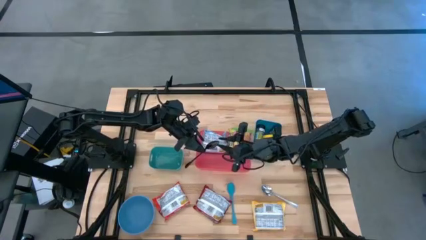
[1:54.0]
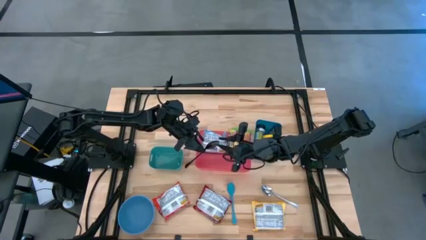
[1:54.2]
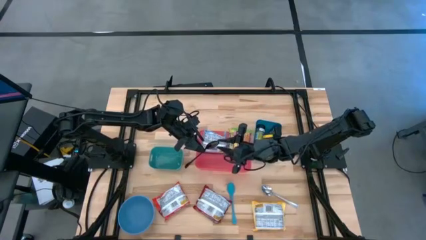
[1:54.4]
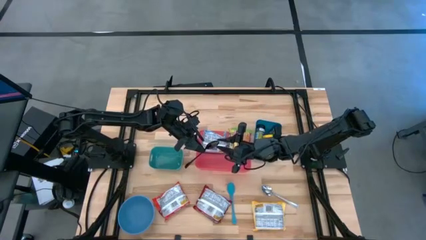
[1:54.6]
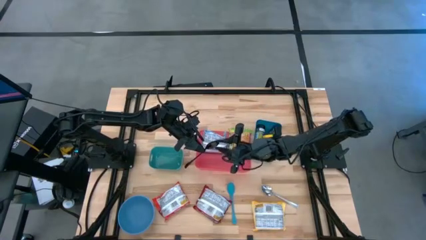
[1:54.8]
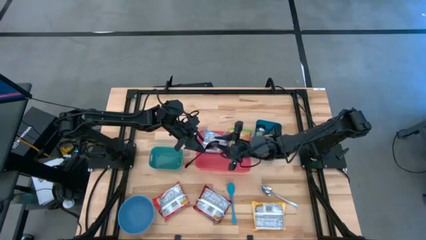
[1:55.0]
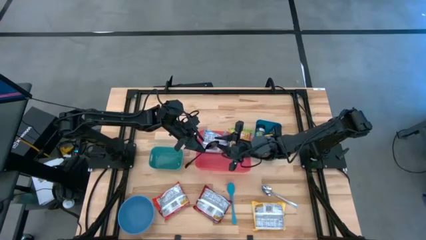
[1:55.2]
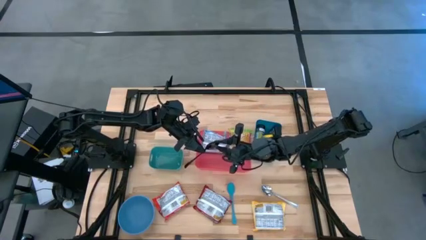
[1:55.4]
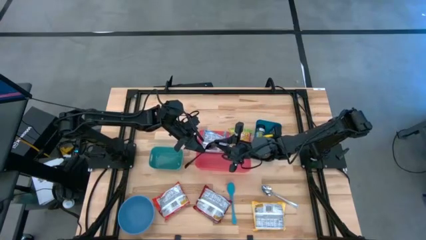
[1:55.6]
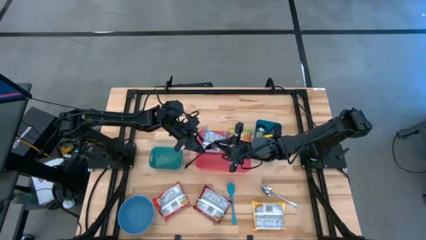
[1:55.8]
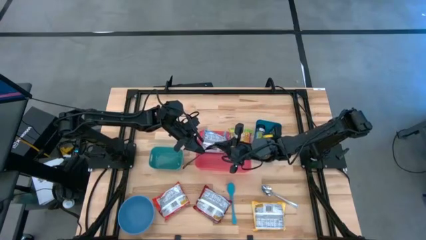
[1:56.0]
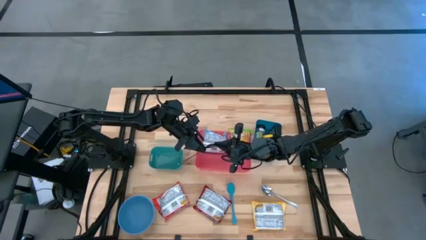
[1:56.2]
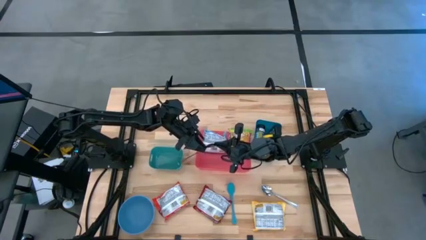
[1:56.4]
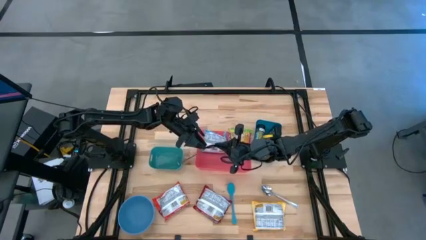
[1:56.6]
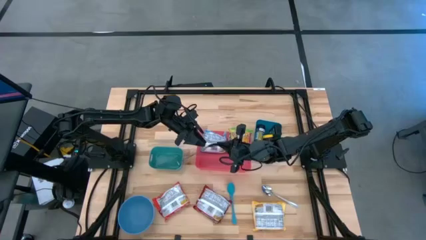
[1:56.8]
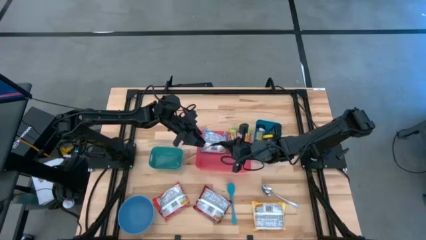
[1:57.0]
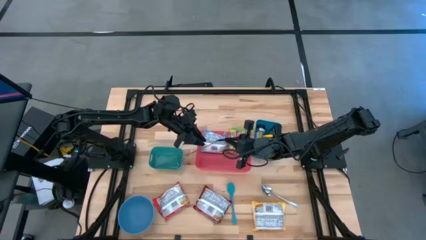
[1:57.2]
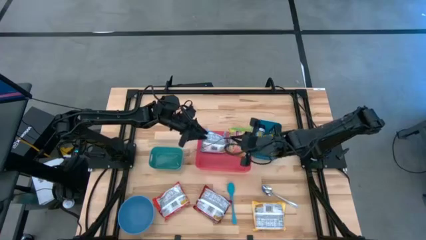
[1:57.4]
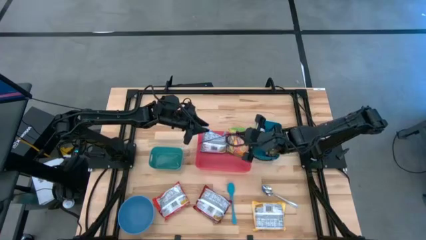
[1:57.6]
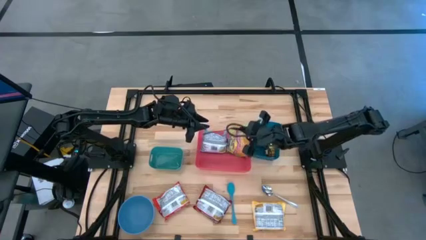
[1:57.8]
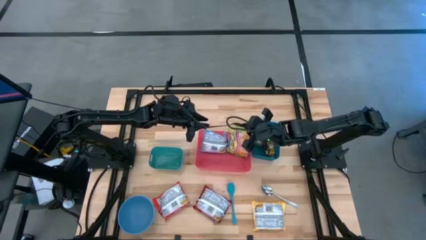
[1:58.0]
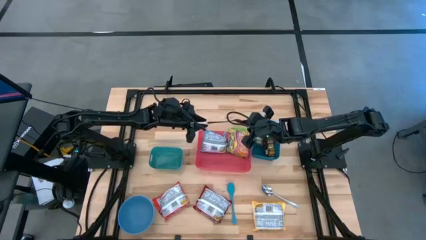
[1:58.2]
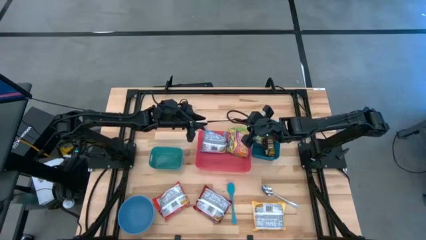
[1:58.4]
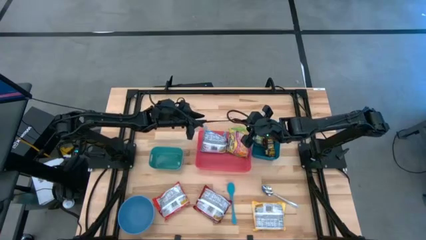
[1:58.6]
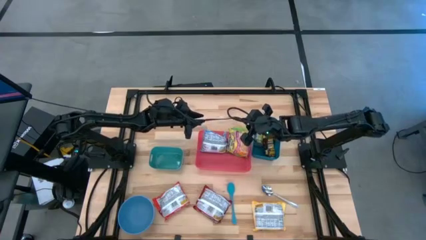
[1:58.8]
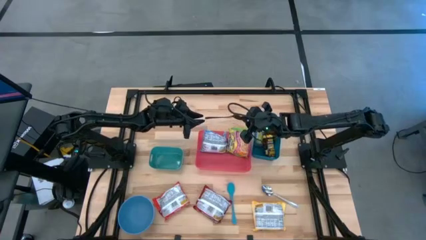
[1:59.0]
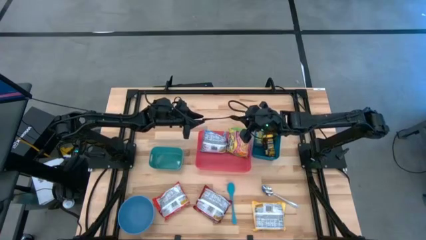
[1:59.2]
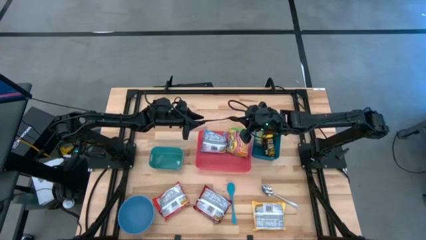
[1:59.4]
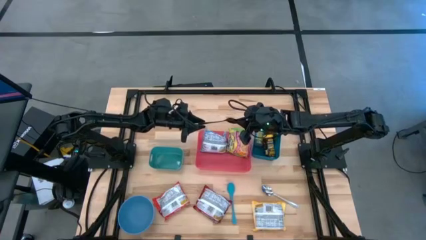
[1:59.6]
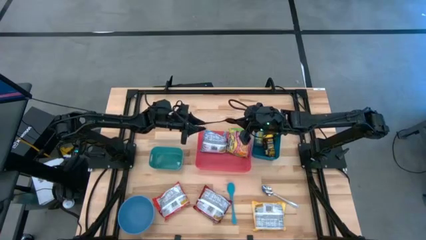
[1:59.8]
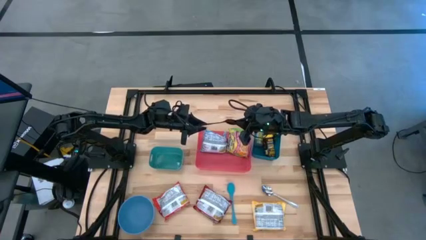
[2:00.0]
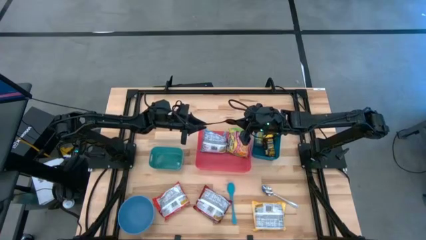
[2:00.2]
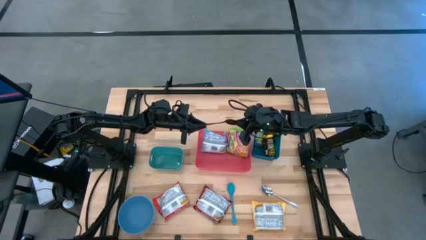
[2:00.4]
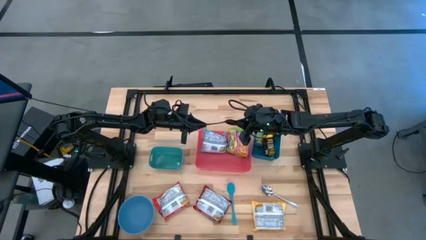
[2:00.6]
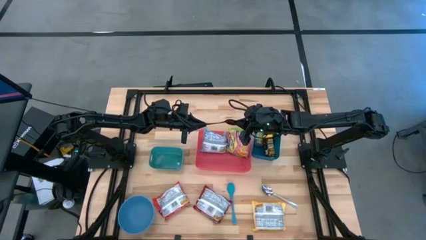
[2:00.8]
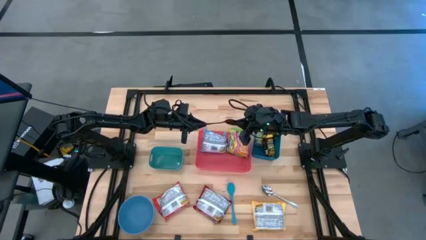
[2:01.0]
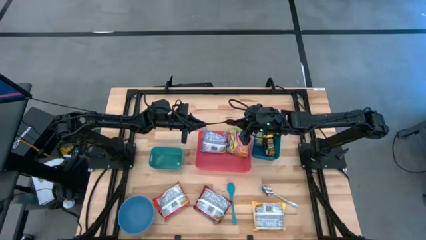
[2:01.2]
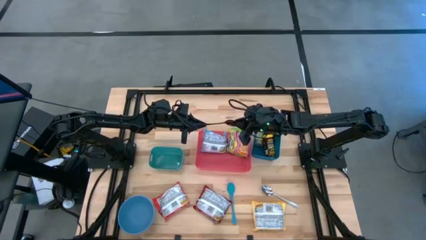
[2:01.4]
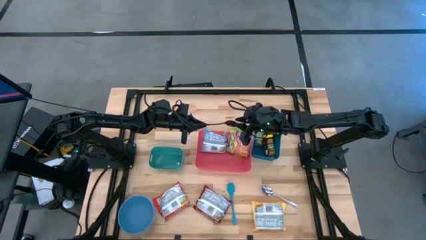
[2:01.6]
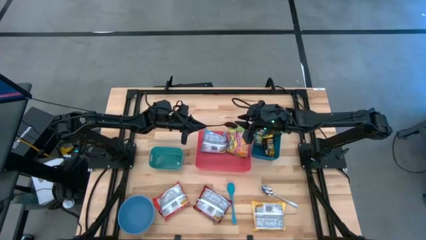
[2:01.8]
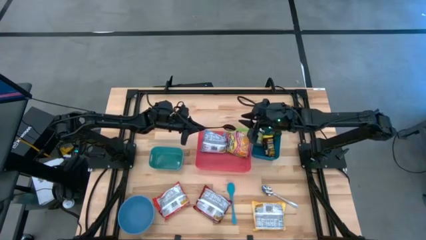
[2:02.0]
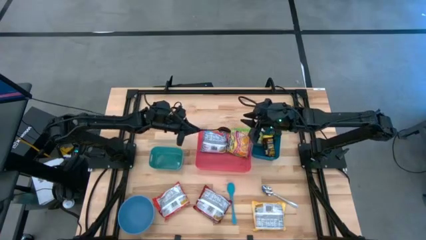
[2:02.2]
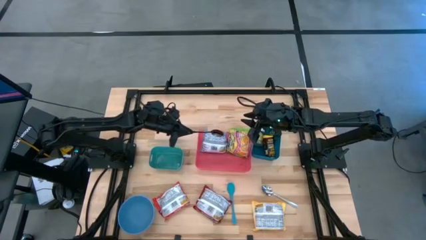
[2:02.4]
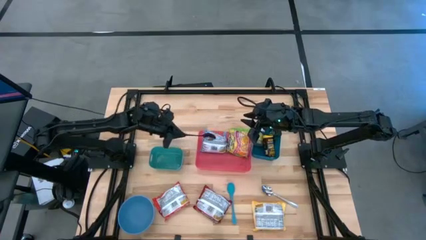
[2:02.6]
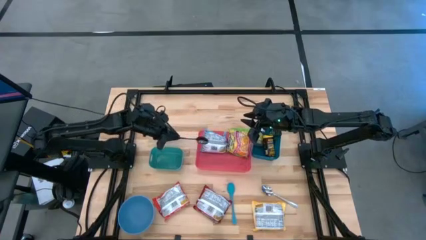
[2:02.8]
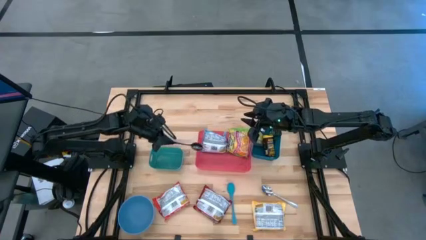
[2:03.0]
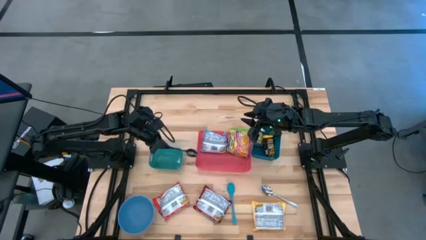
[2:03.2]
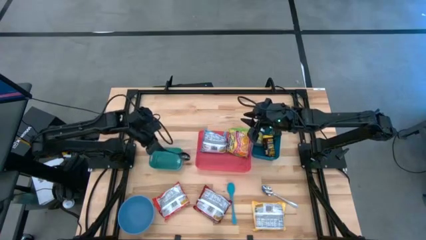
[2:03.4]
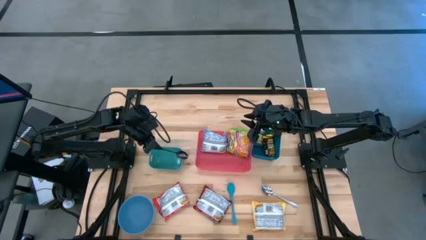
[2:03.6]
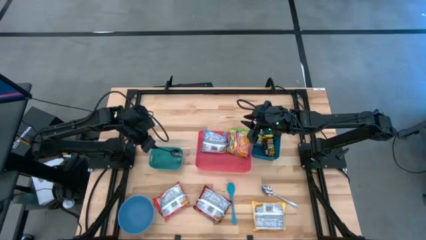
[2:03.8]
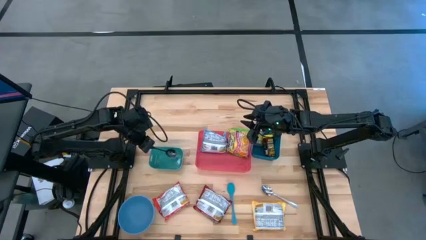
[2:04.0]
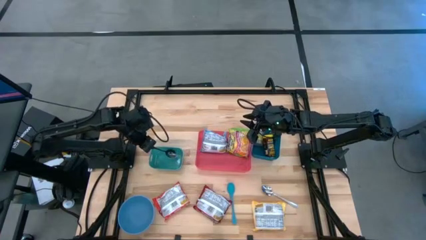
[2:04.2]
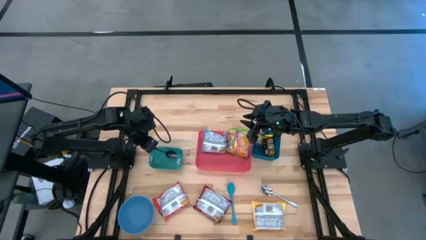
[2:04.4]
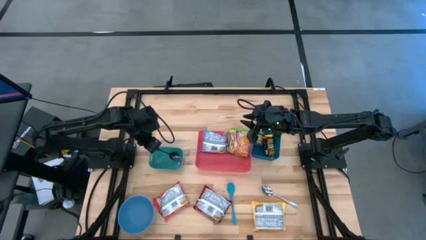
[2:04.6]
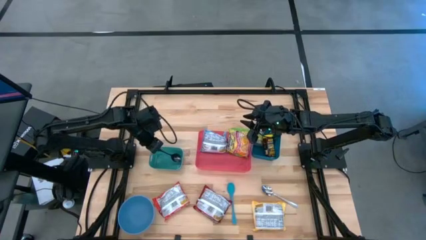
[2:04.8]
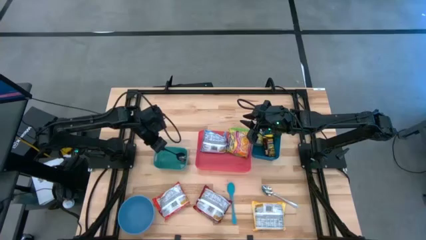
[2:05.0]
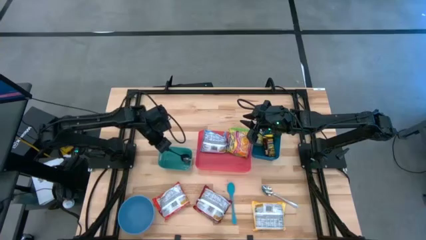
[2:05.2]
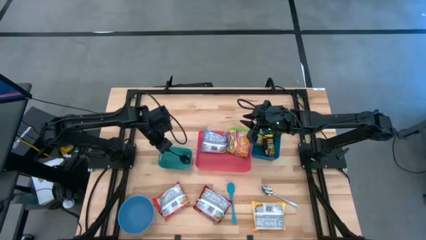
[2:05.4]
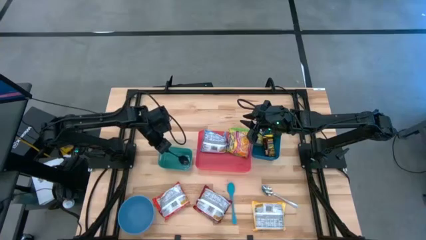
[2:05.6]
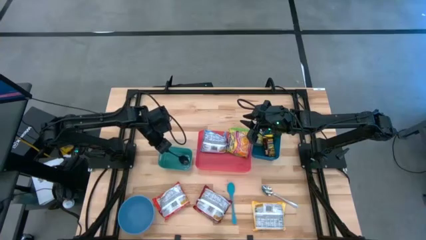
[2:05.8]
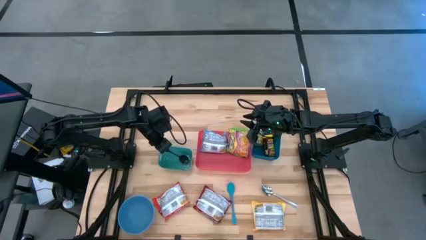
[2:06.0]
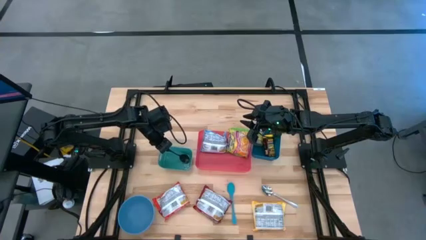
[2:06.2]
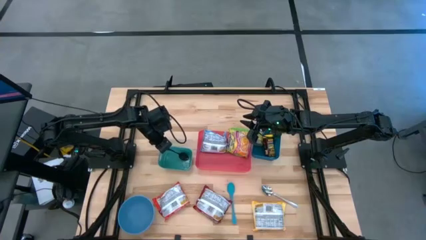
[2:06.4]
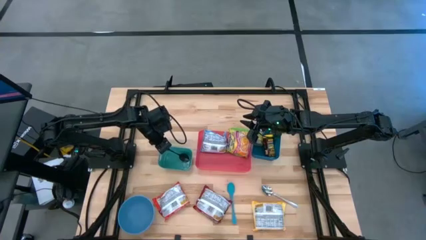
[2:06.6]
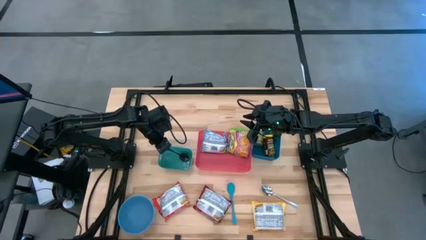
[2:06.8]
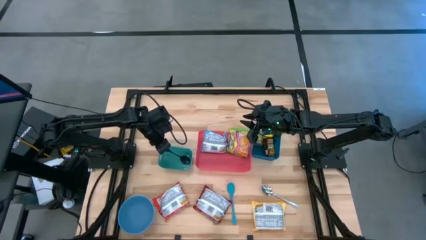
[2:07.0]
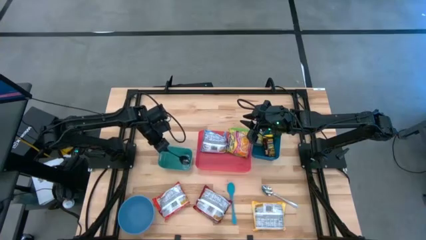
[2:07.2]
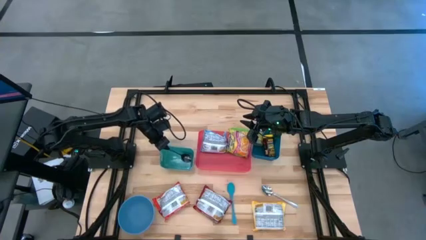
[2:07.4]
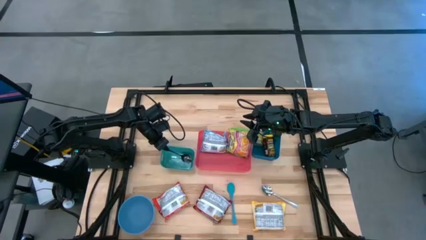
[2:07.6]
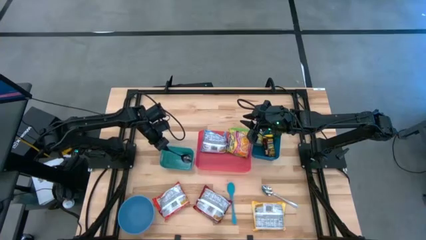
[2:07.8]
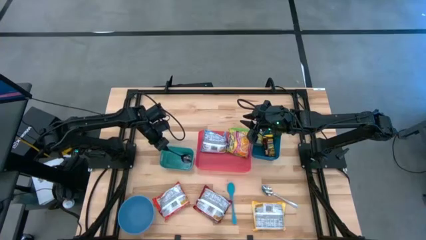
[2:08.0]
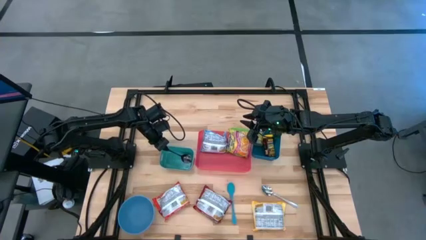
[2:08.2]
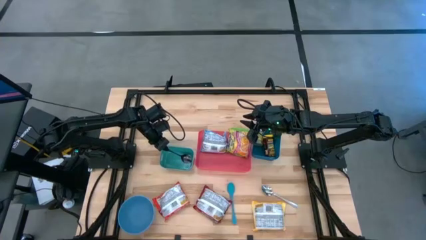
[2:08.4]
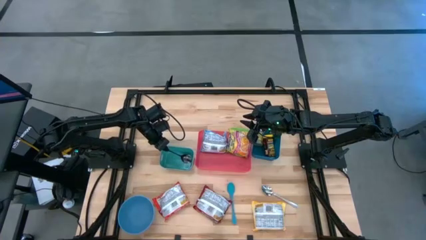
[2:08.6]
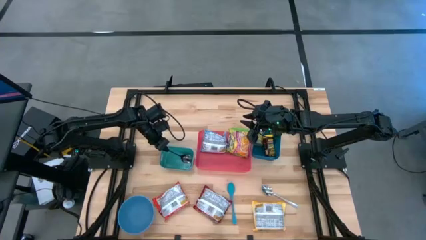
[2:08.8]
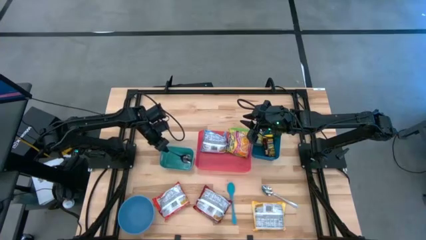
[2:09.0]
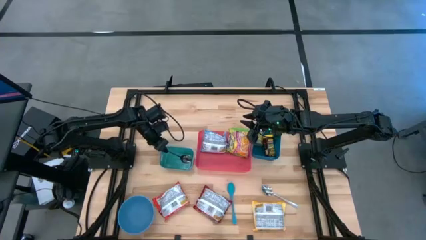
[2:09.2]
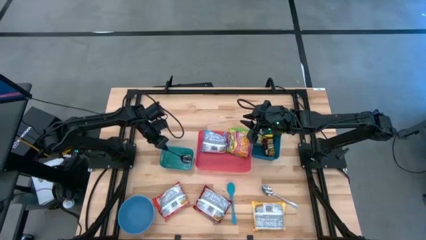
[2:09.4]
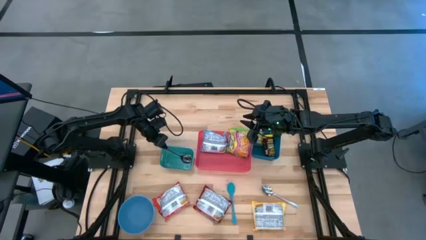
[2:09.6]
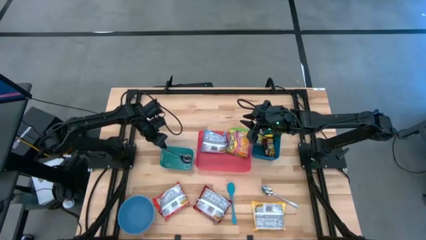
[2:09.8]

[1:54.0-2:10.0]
Task: Pick & Place Food Item
Put the black spoon into the green bin
